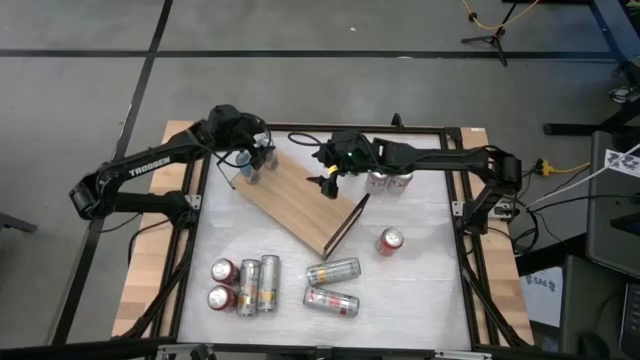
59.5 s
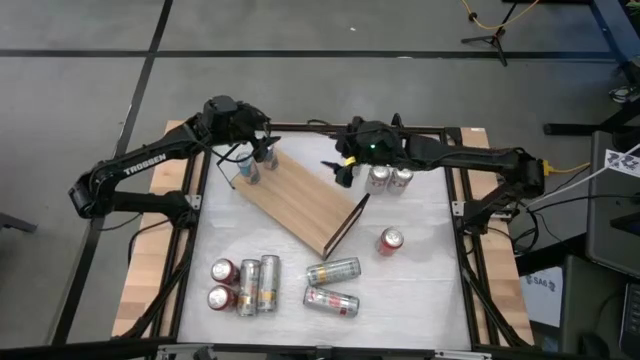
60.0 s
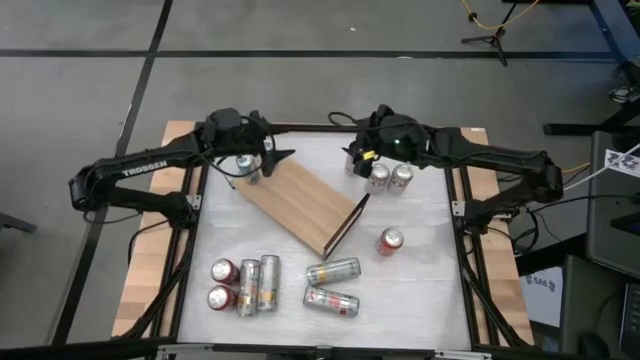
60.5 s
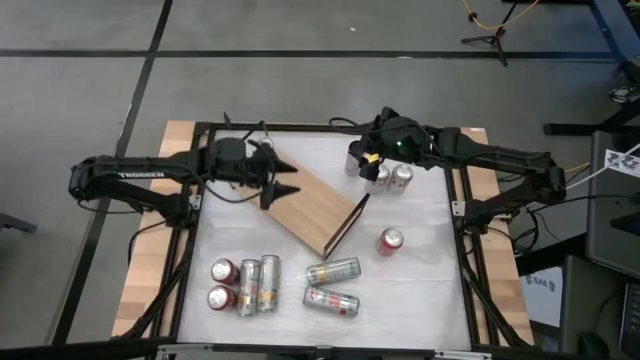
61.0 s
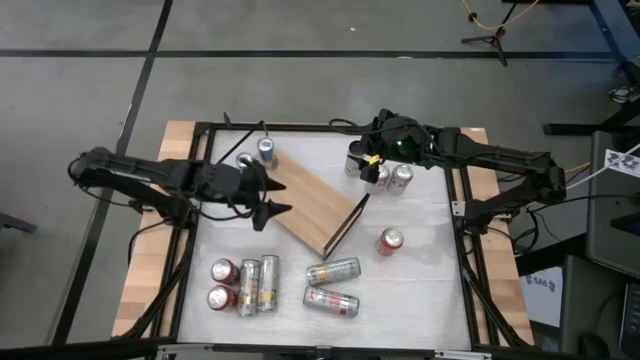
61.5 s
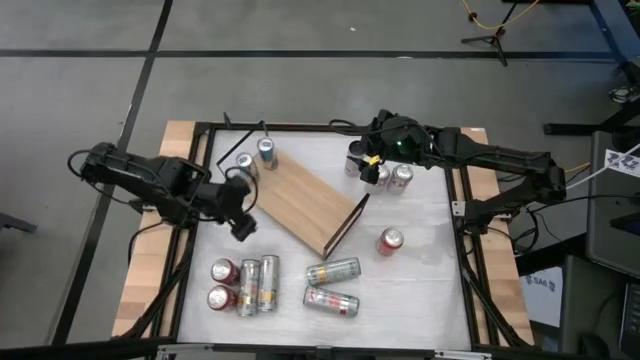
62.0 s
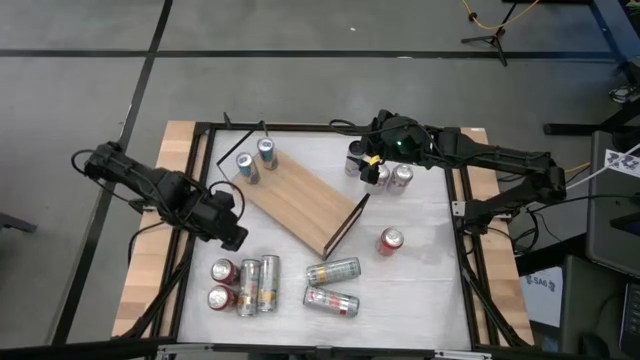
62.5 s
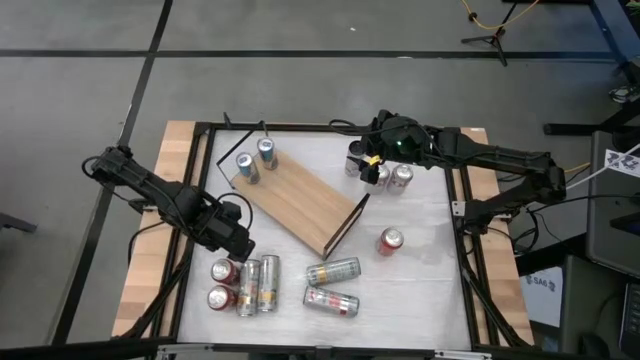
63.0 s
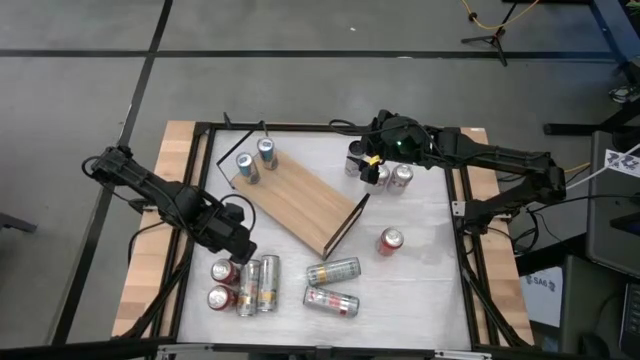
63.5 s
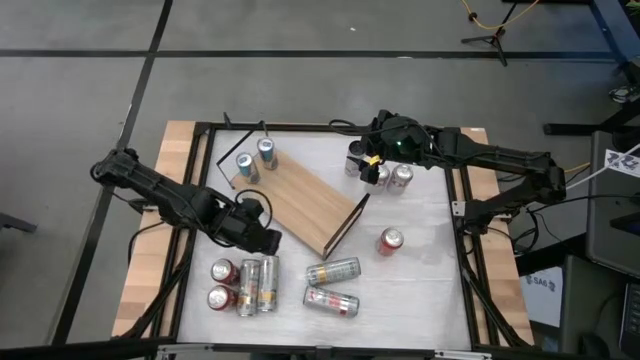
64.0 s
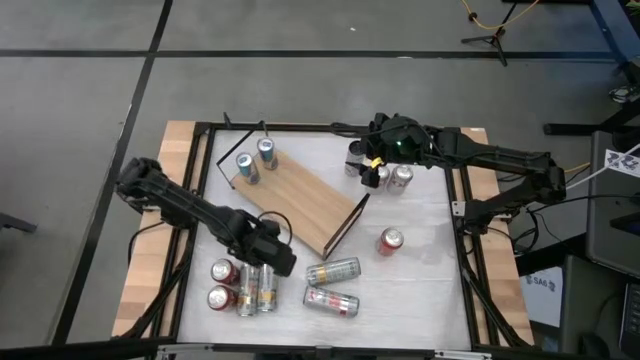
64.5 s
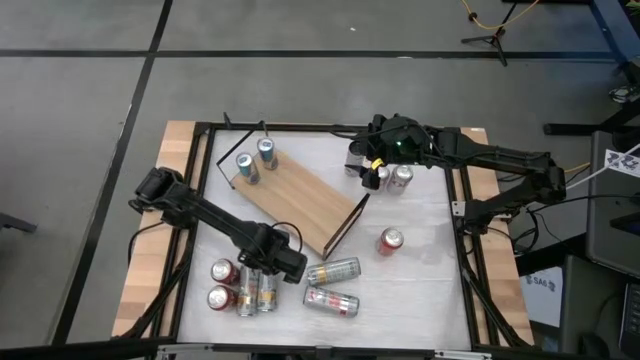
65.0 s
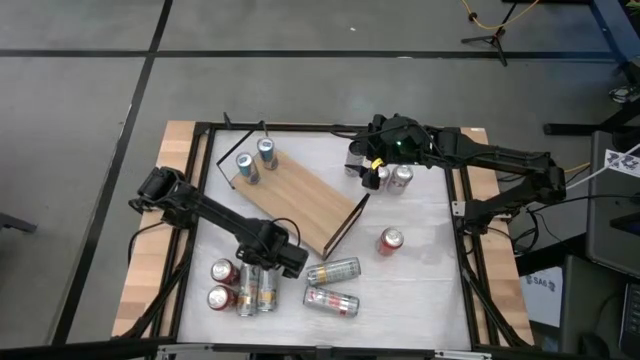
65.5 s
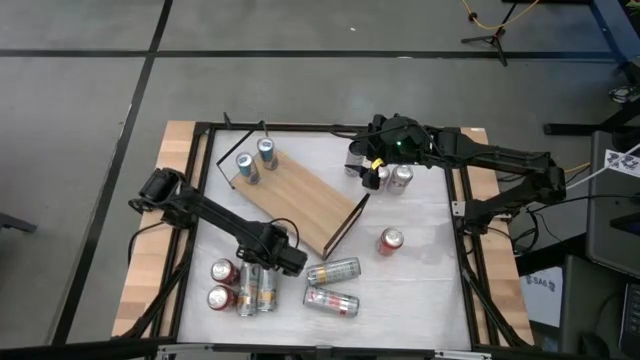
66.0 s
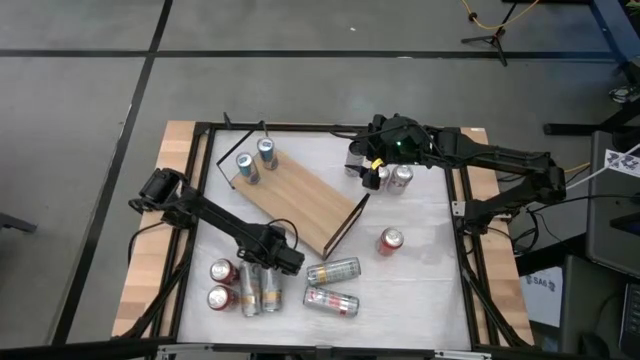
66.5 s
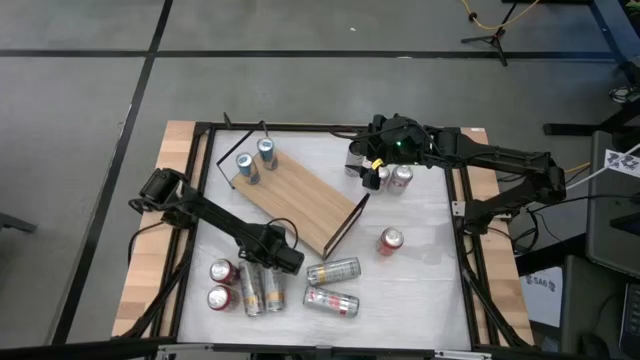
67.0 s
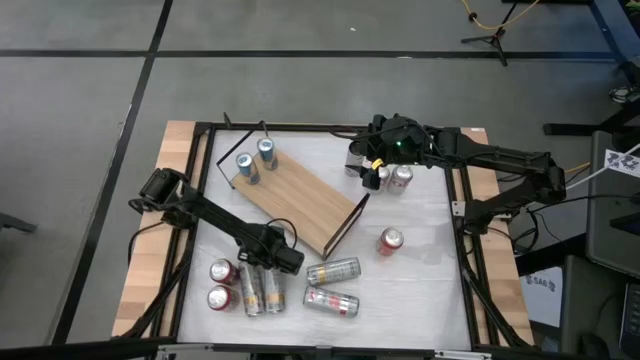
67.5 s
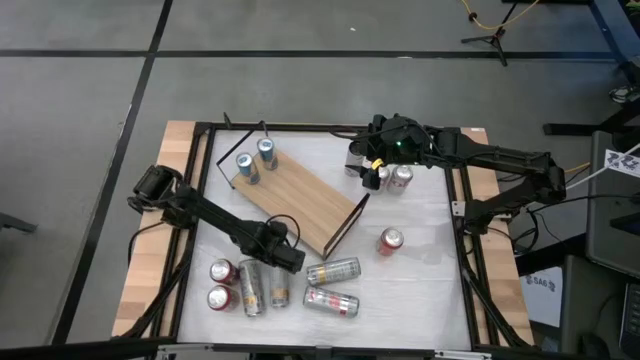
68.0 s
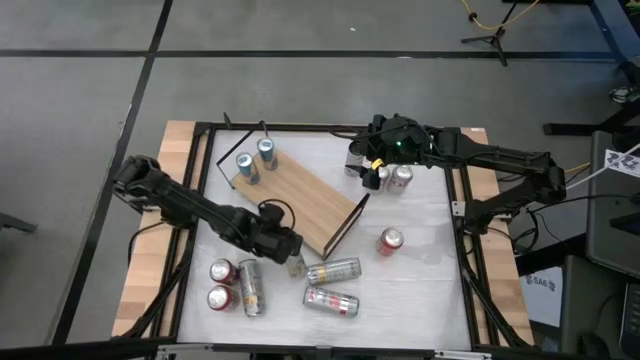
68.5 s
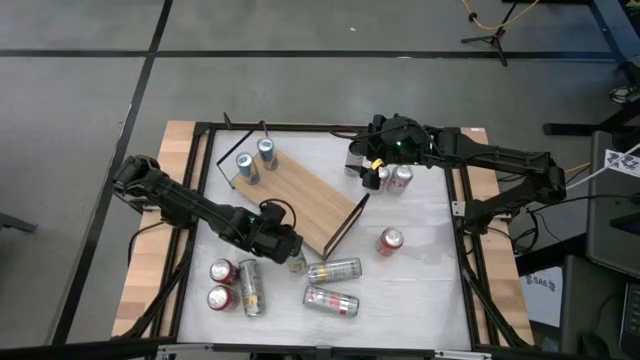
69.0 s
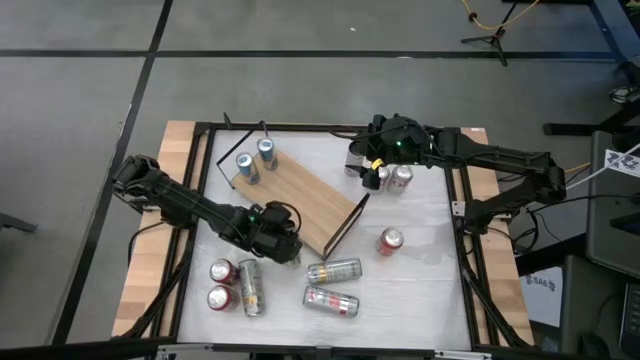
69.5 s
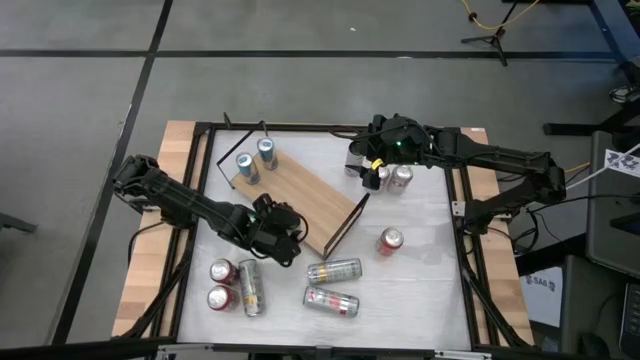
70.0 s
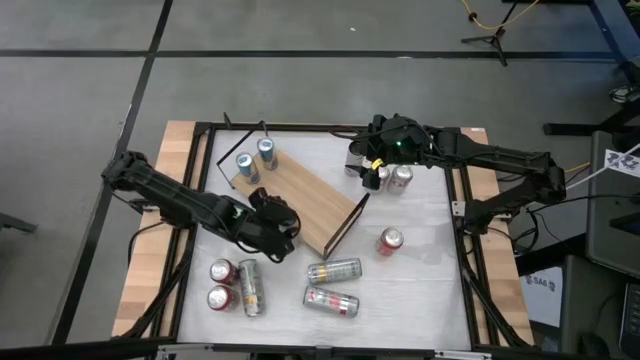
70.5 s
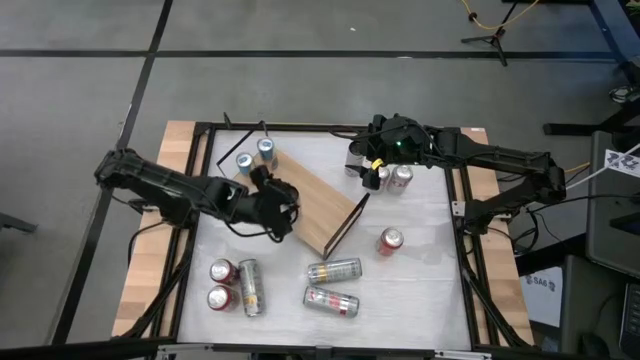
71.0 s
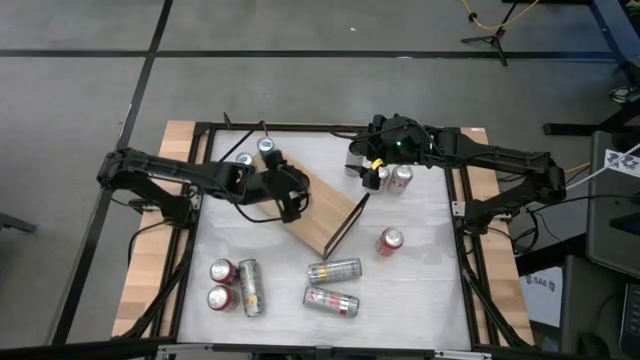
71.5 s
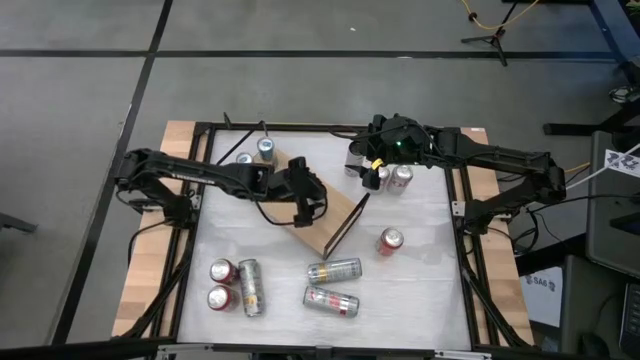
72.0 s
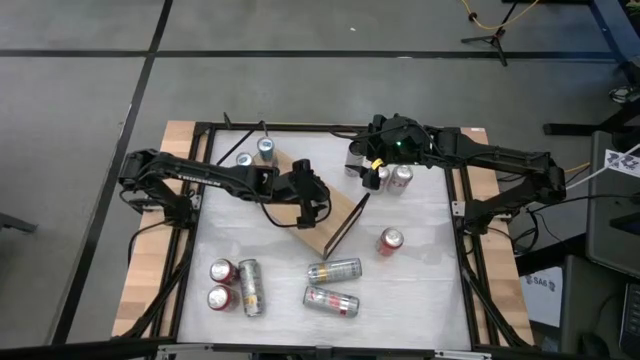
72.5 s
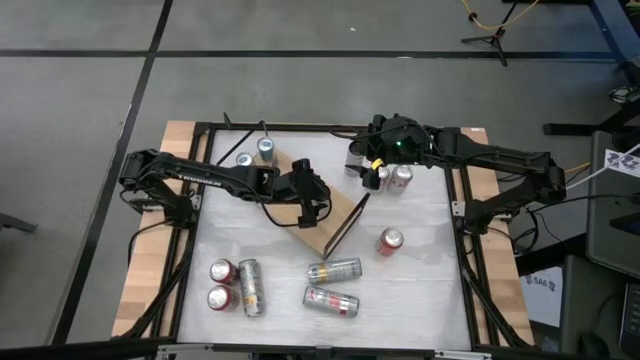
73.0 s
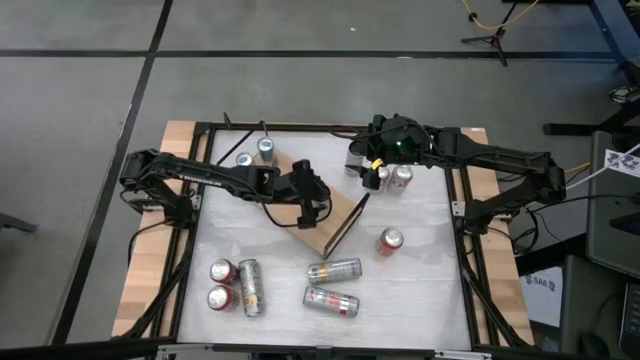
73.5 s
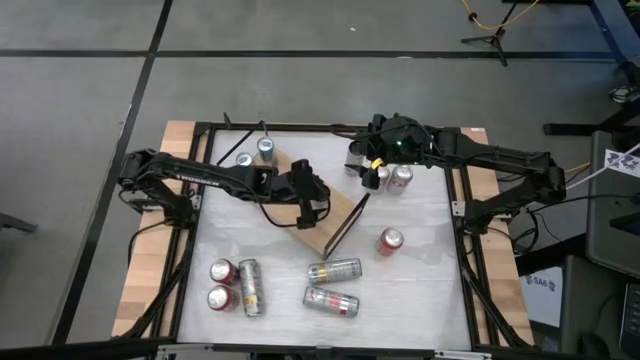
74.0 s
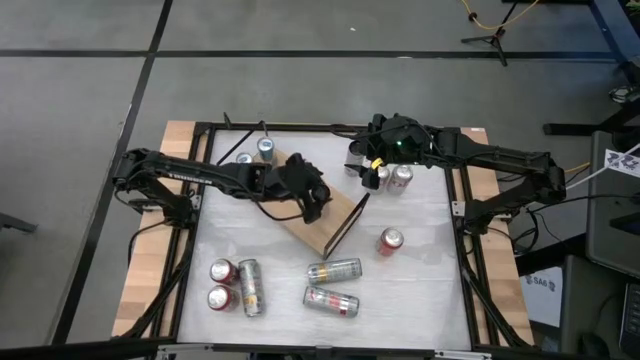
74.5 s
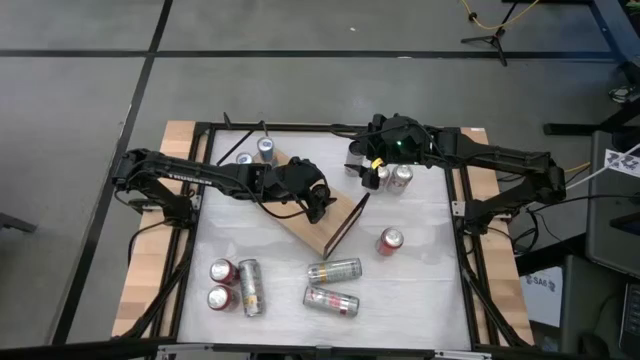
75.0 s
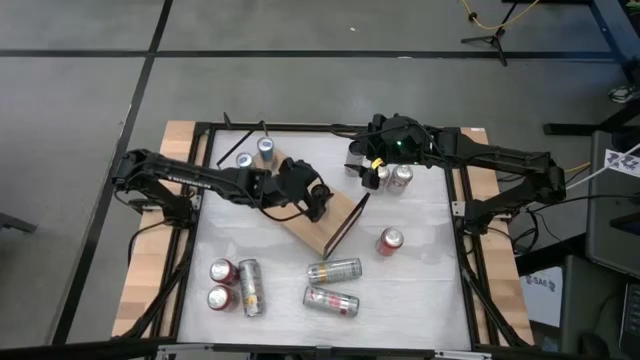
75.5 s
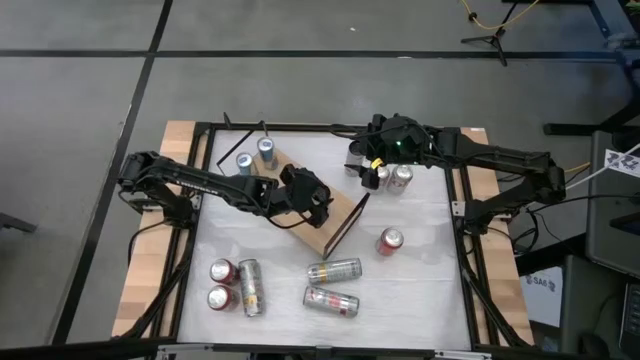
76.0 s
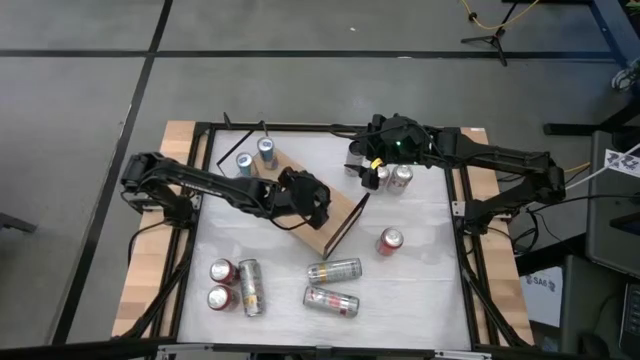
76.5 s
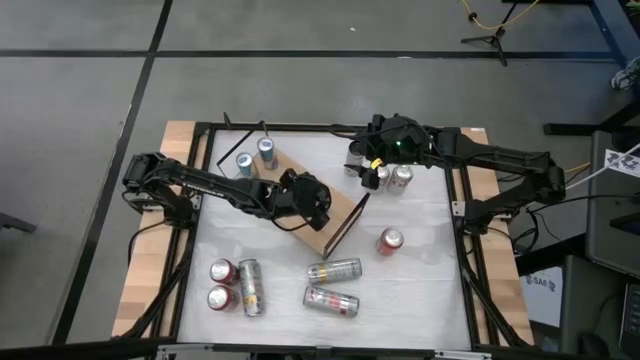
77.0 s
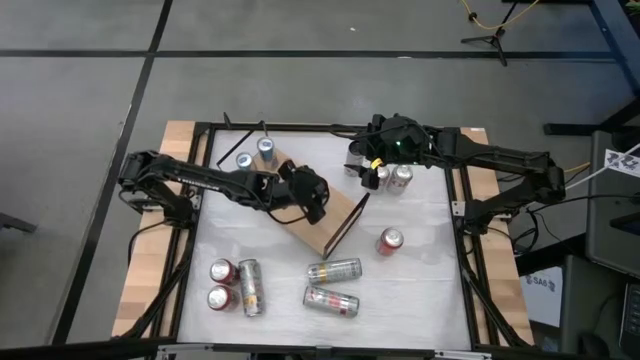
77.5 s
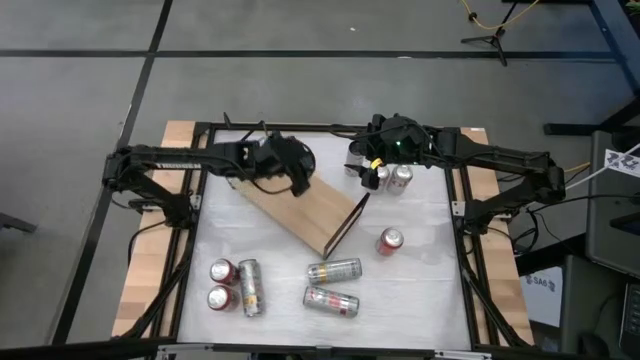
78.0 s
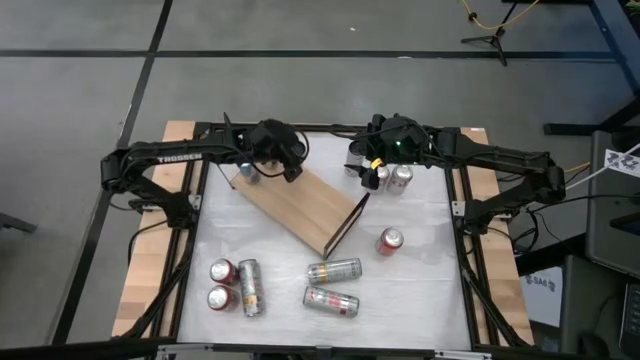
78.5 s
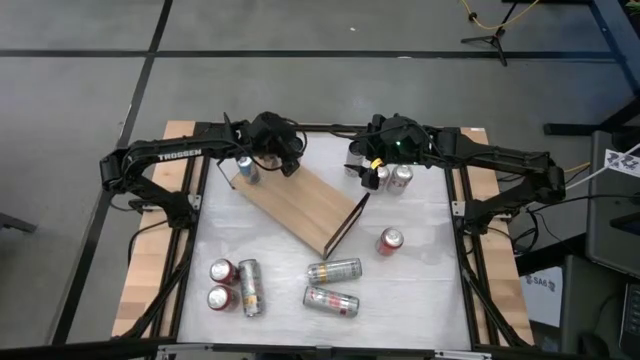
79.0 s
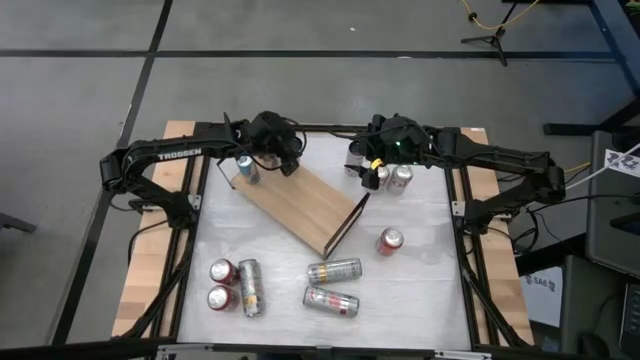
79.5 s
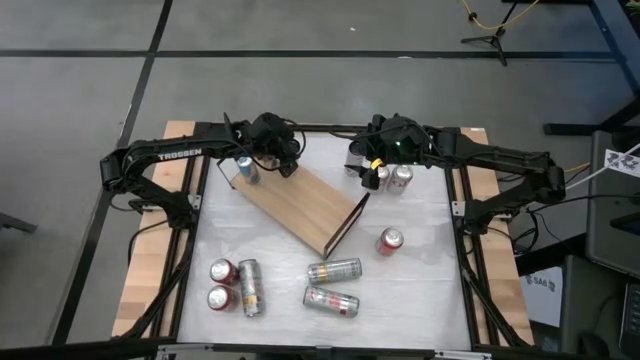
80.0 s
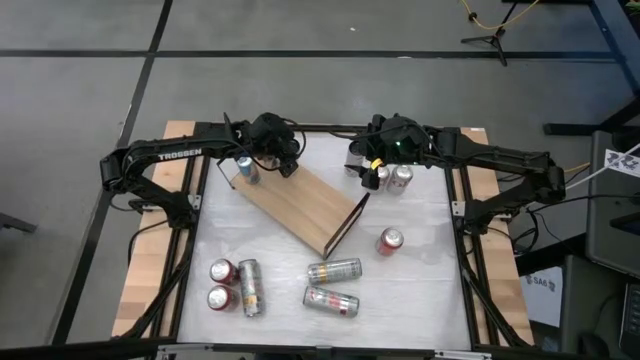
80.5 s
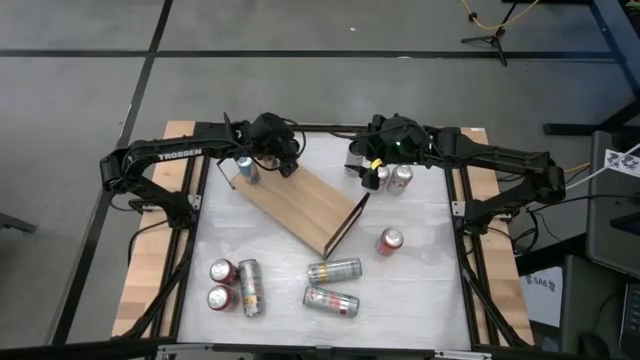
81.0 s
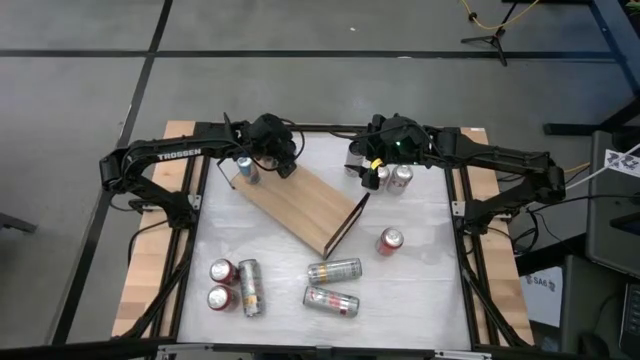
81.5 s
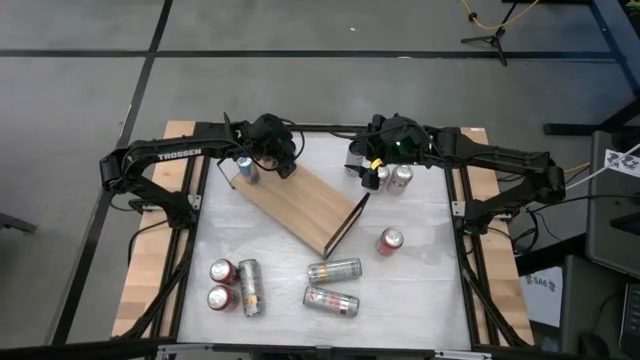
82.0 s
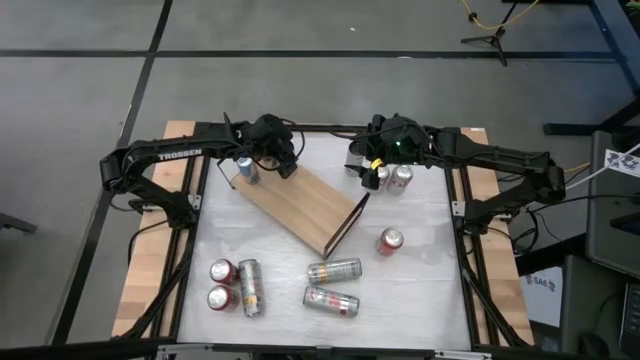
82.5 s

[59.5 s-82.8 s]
Task: Place canned beverage on shelf
Put the middle white-yellow soda can on the shelf
